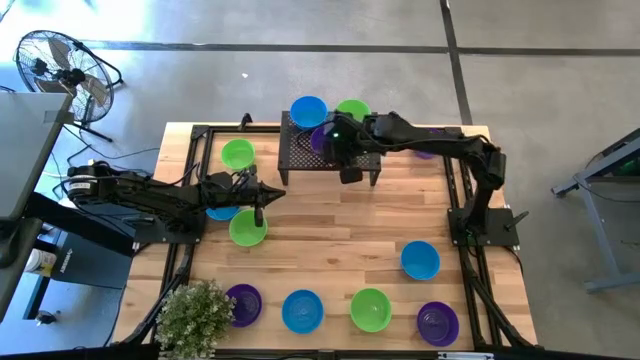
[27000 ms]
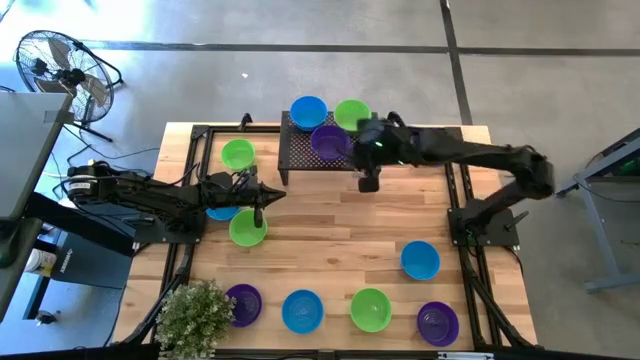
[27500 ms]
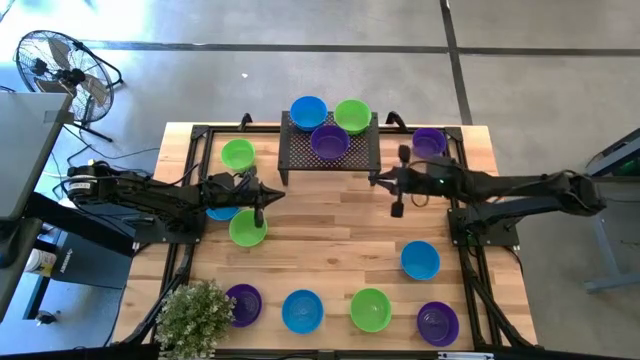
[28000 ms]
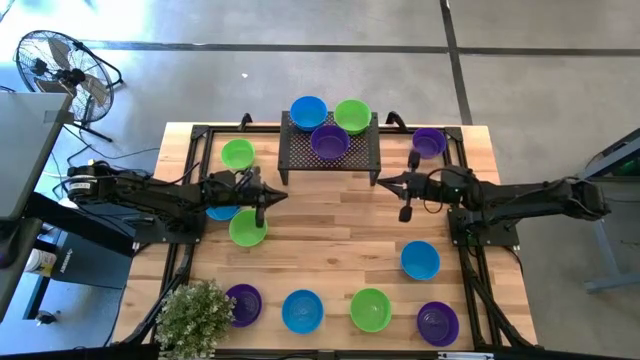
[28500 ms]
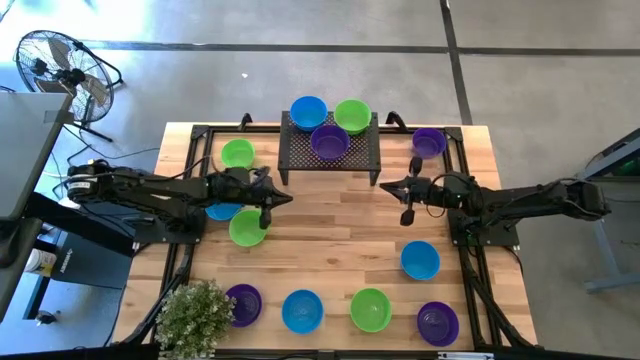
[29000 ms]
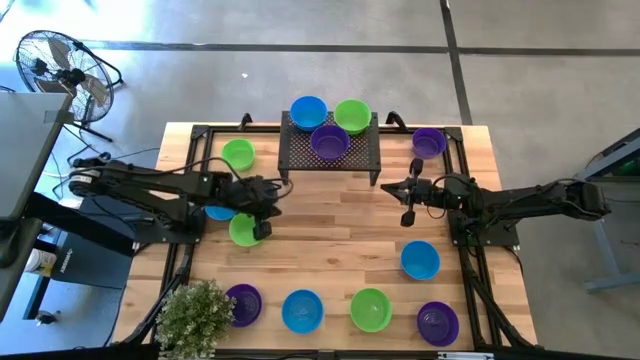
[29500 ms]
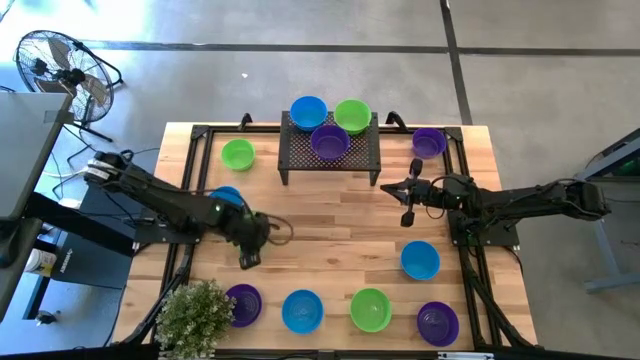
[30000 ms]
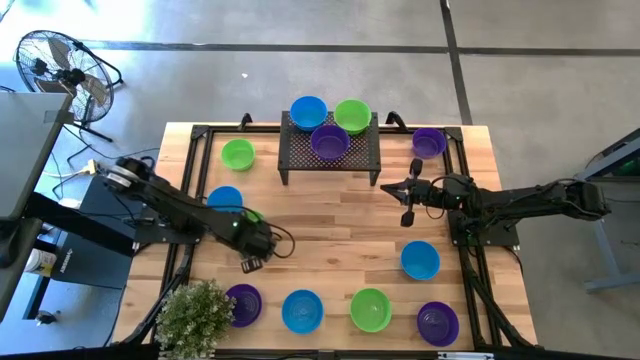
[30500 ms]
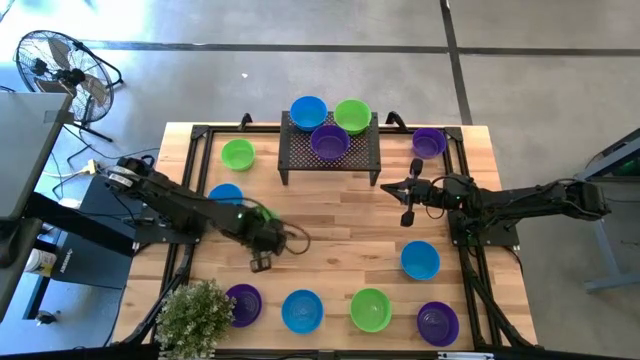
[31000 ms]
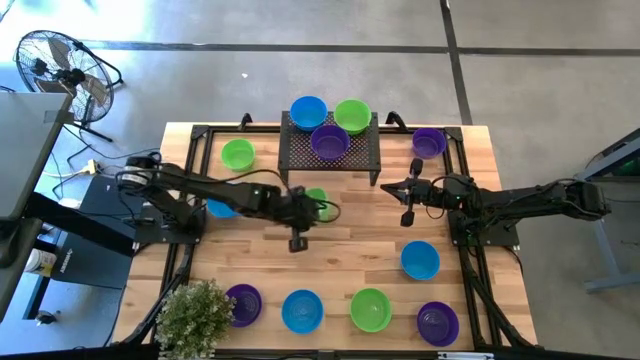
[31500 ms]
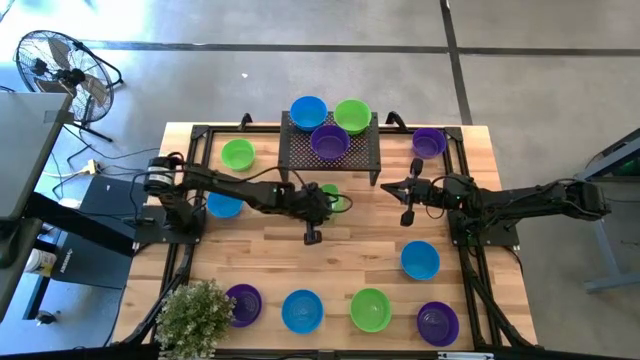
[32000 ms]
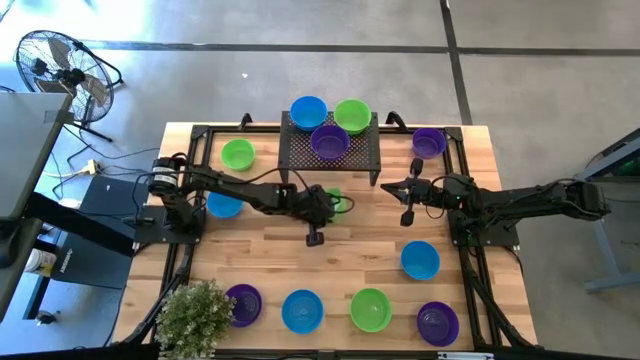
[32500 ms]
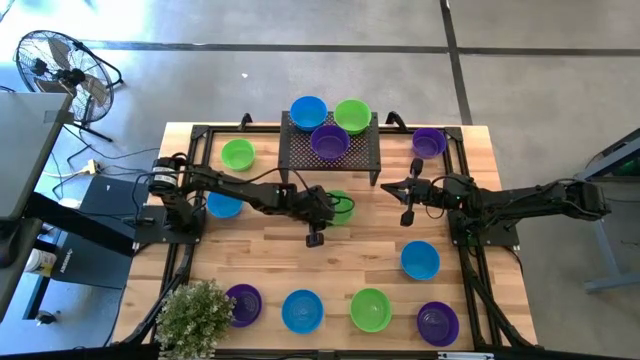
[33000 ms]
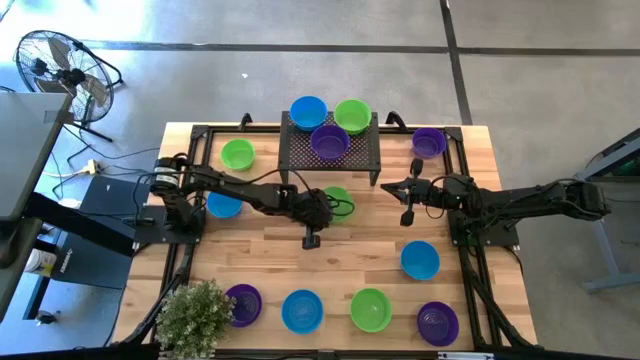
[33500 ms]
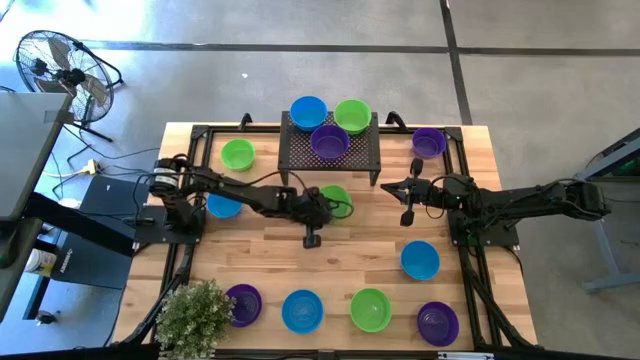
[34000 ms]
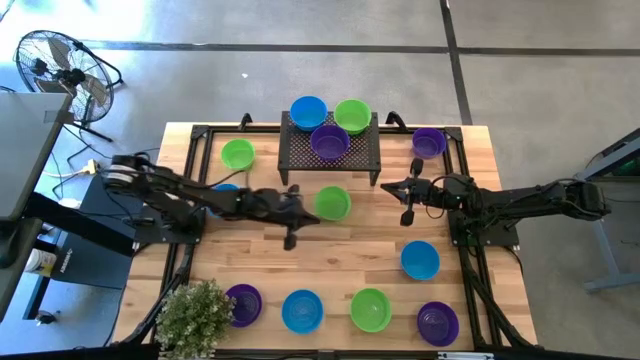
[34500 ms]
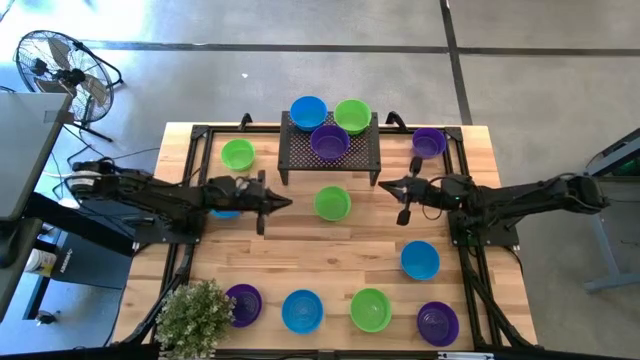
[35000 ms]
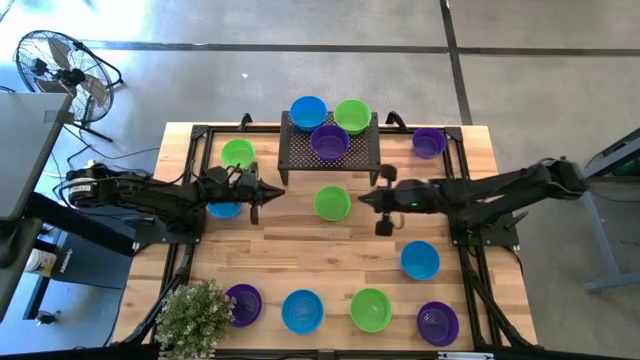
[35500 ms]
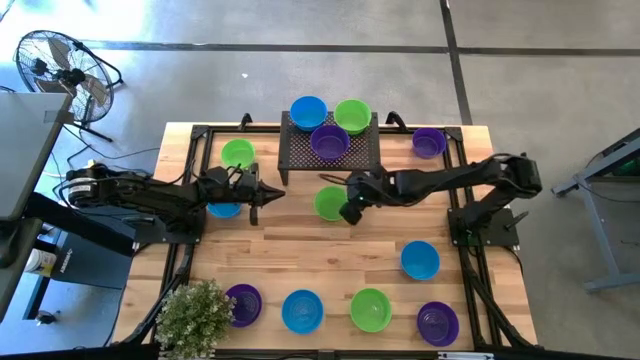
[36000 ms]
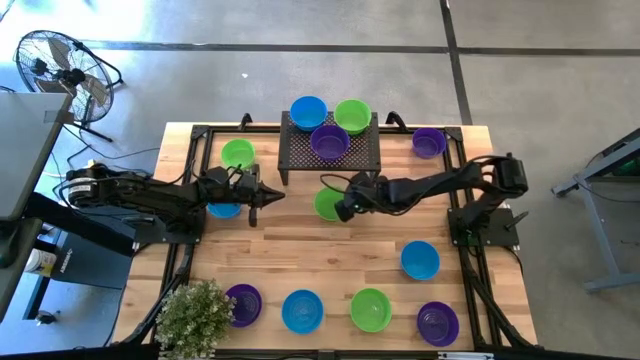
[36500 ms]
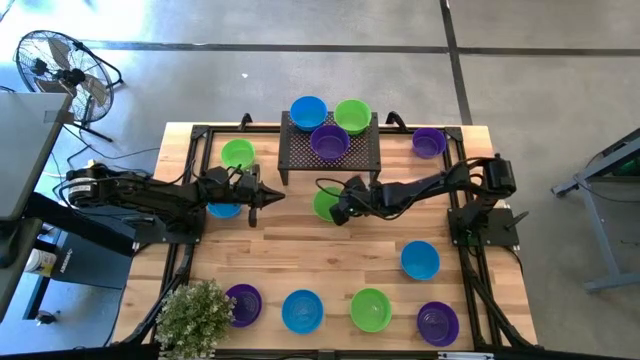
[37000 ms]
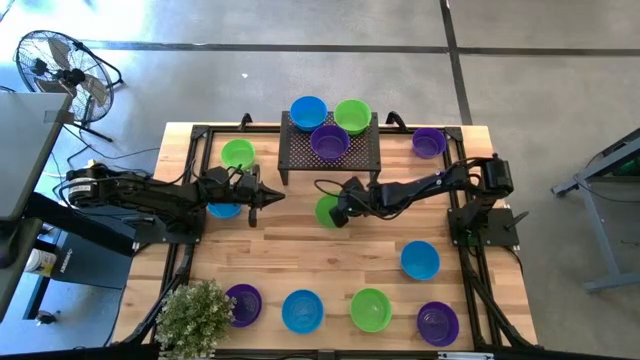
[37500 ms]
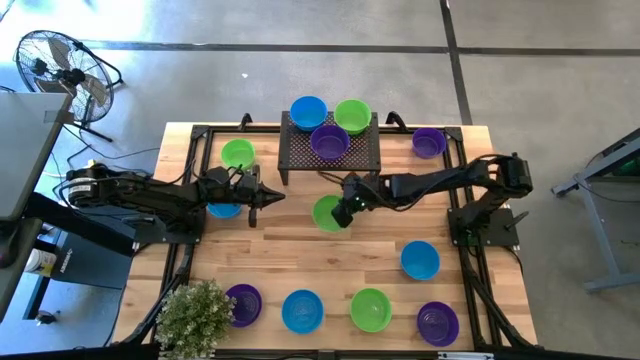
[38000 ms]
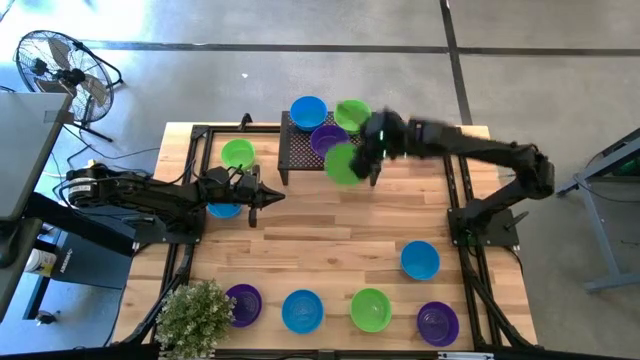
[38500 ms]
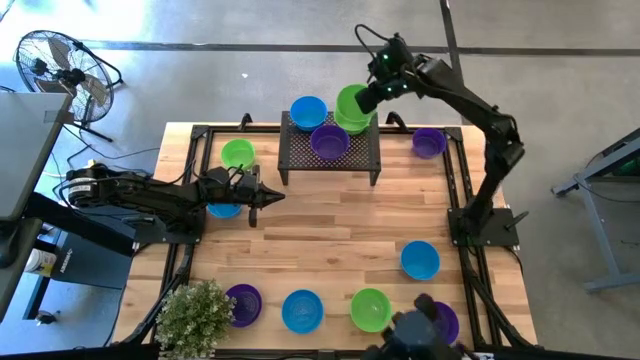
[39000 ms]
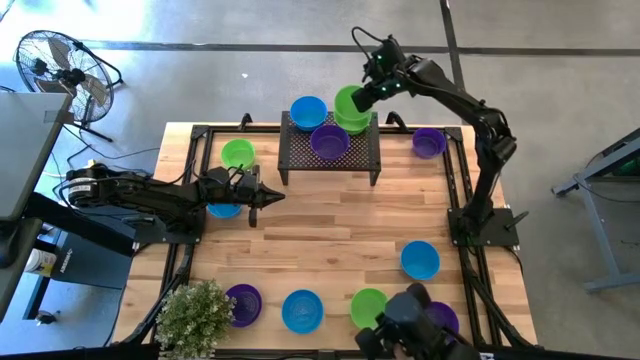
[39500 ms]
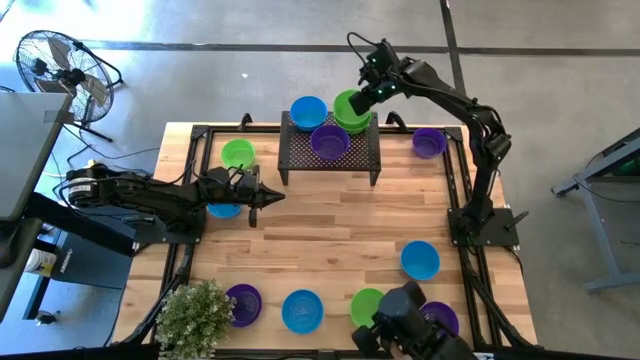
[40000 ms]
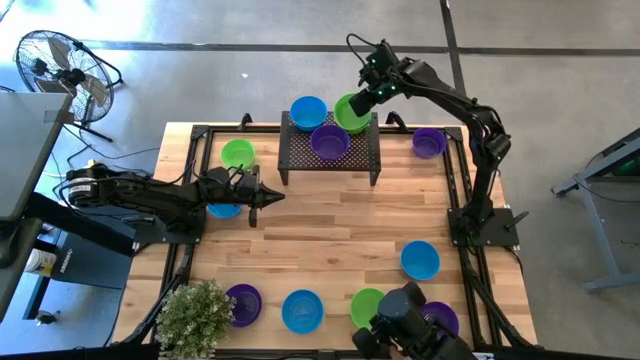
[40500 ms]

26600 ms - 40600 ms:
Task: Pick & Place Mini bowls
Stack the middle green bowl on the green bowl on the shelf

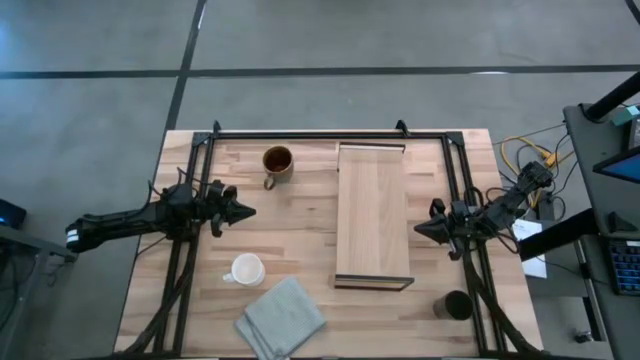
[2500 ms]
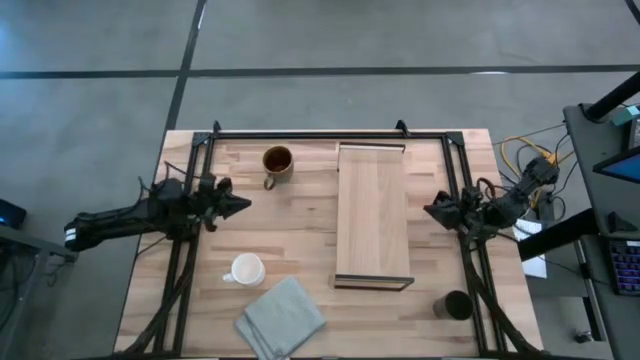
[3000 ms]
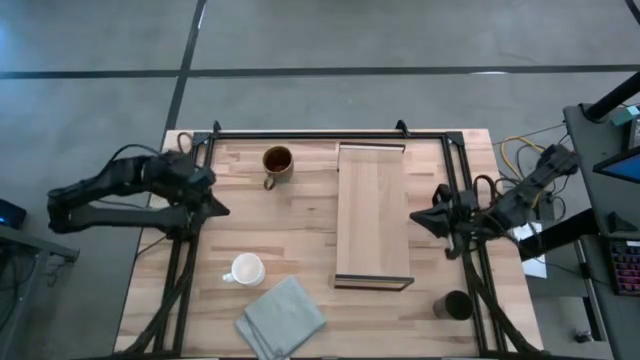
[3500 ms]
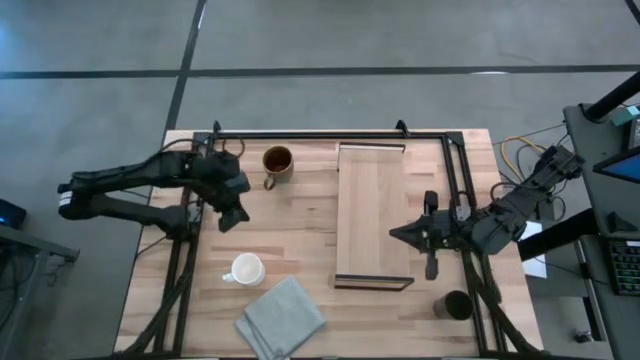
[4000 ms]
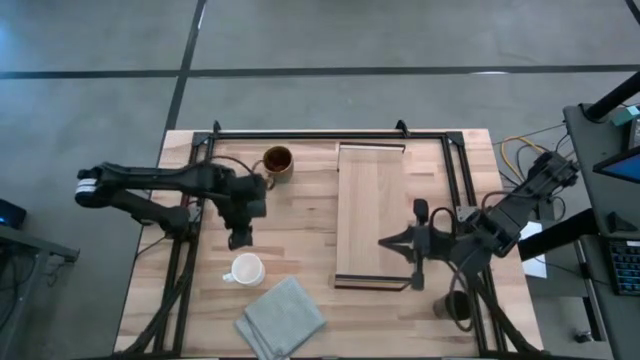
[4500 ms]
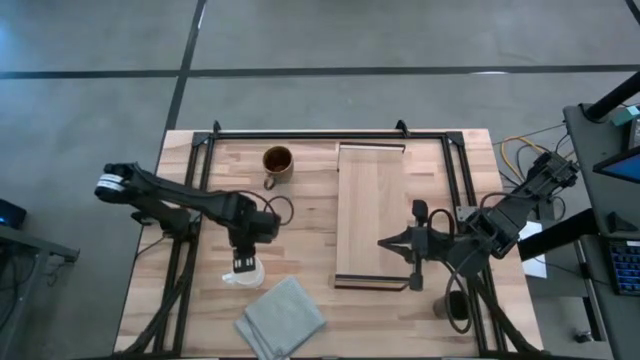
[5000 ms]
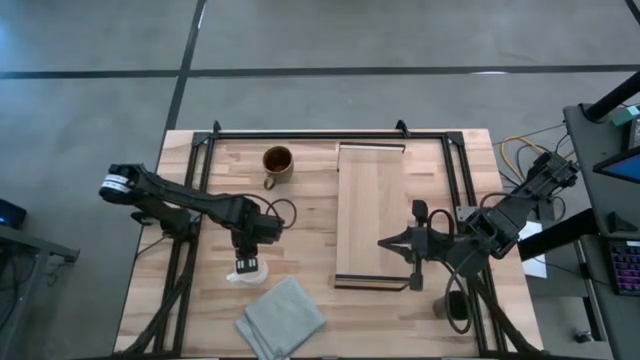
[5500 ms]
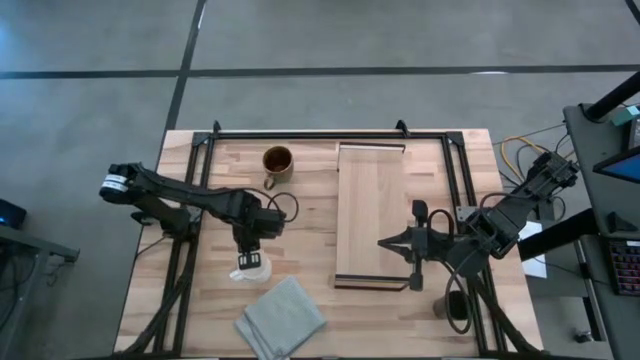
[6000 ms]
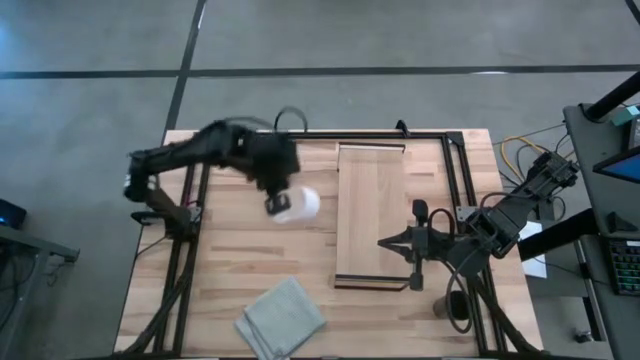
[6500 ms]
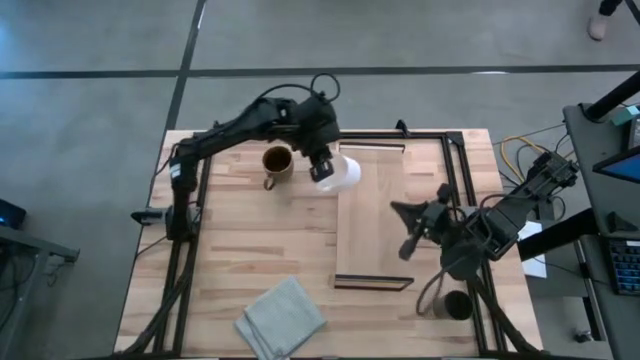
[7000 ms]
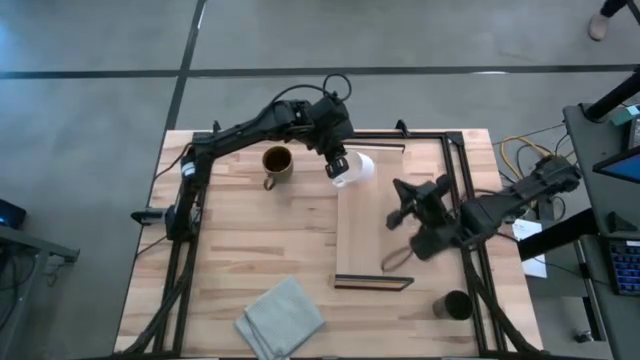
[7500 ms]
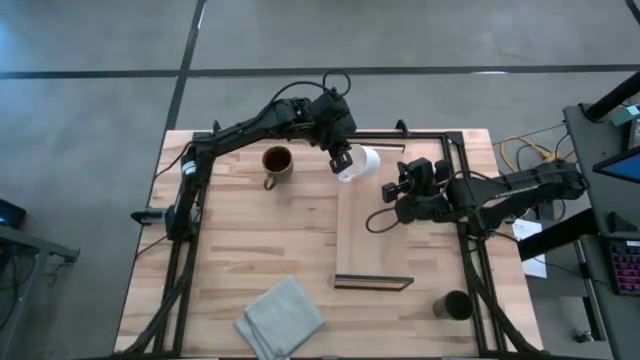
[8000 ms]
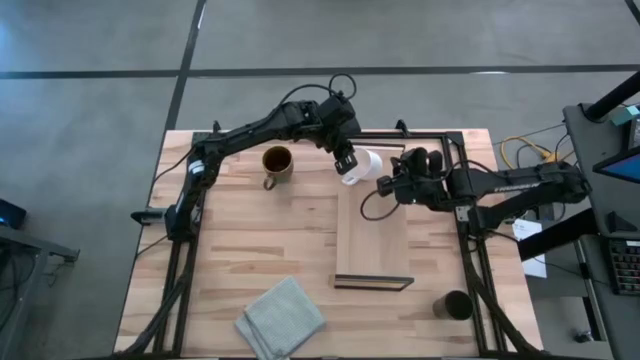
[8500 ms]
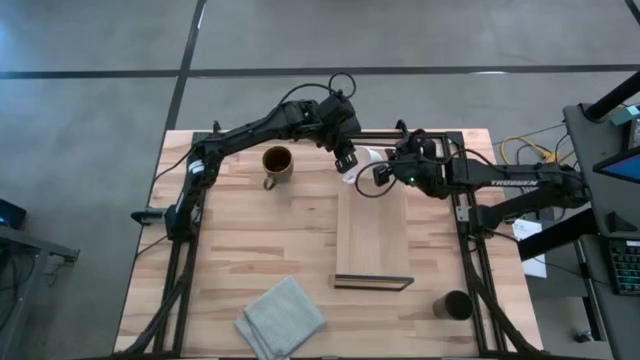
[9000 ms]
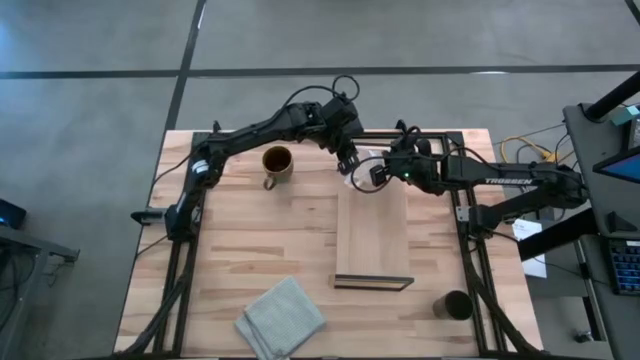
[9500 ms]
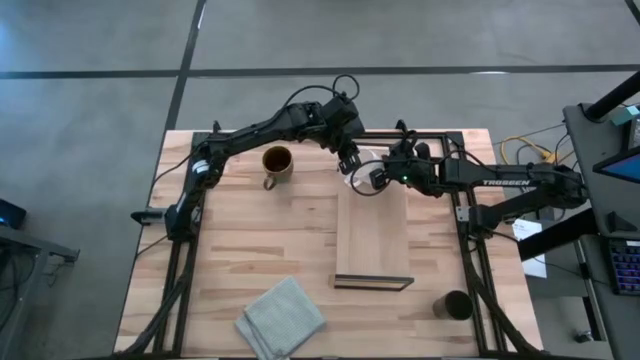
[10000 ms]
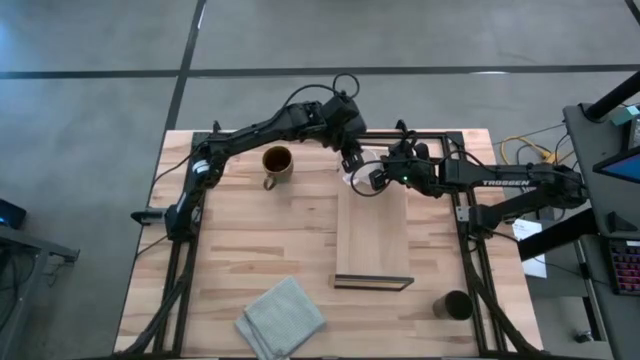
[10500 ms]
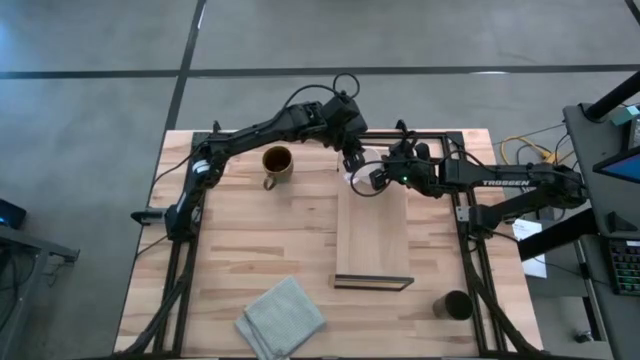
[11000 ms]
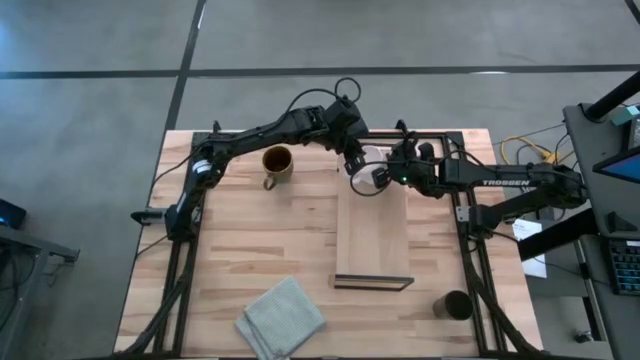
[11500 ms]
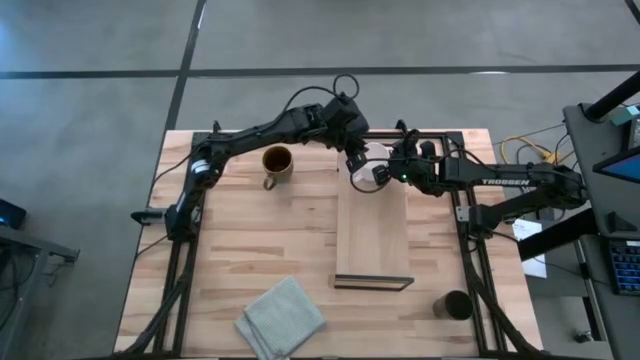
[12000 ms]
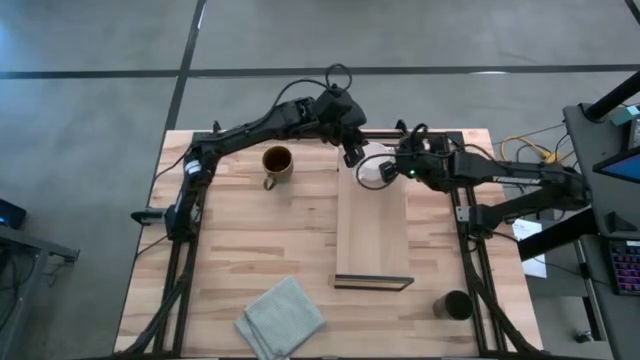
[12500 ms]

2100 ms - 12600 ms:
Task: Stack small to large cups/mugs on shelf
Put the white mug on the shelf
